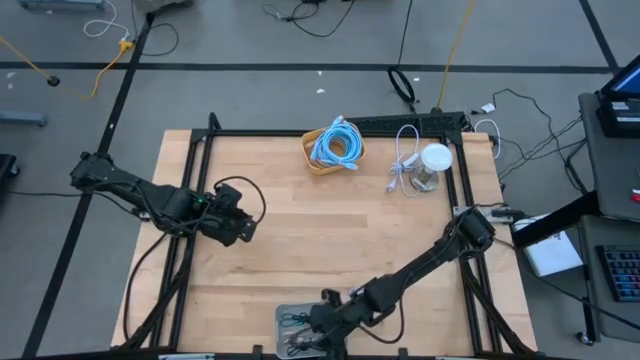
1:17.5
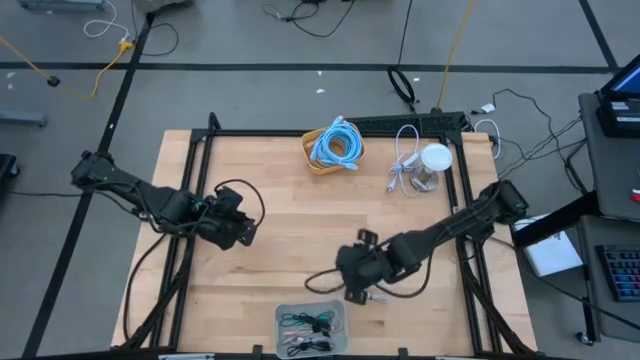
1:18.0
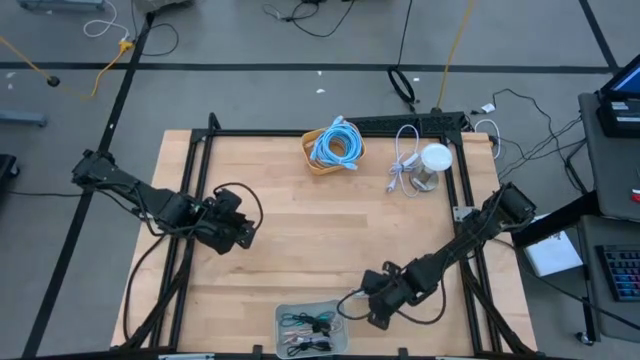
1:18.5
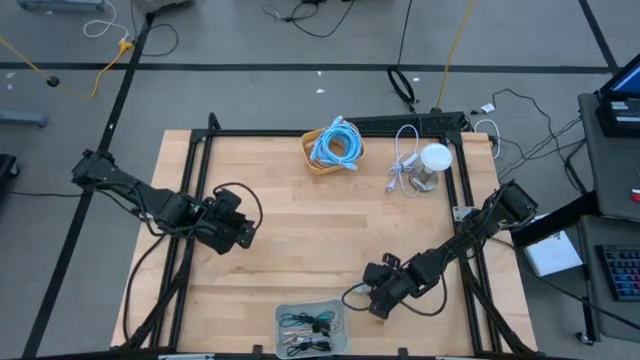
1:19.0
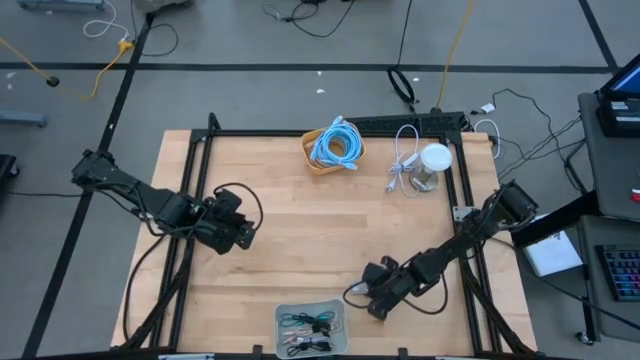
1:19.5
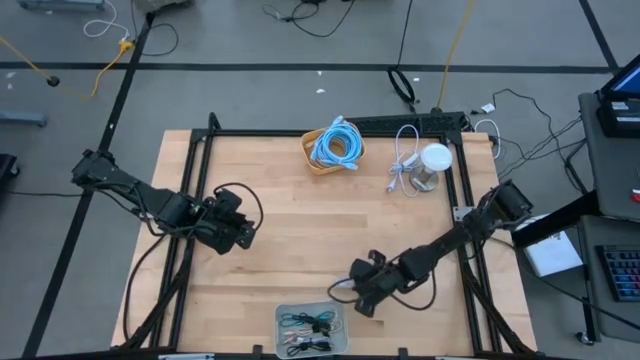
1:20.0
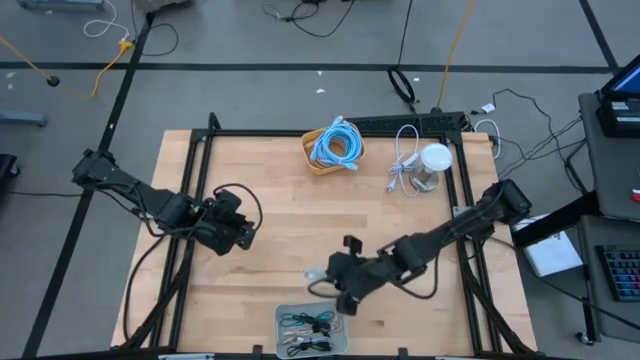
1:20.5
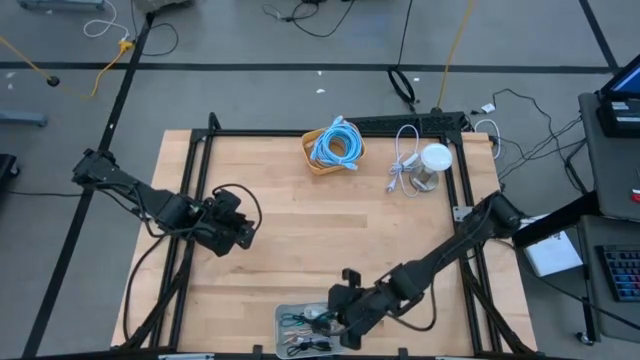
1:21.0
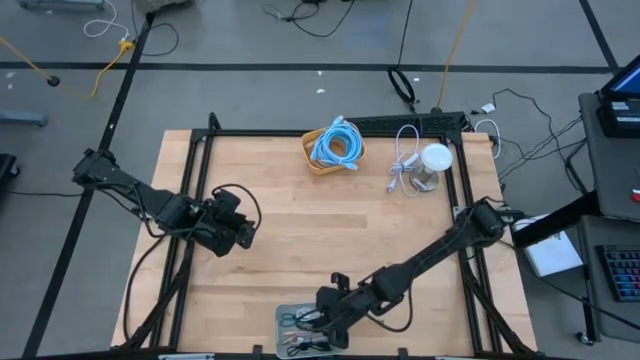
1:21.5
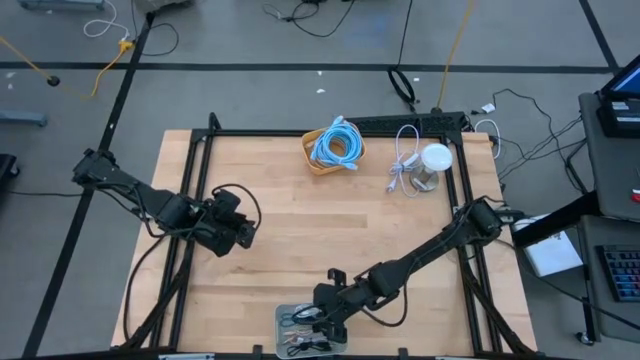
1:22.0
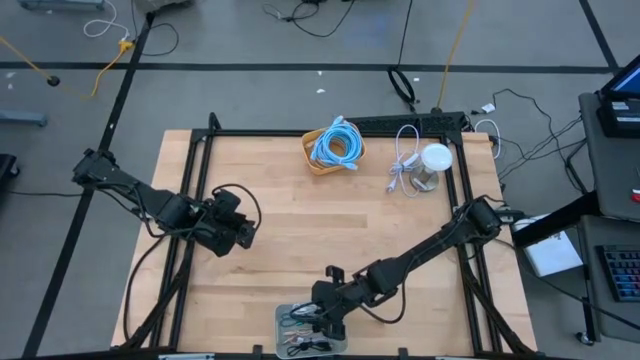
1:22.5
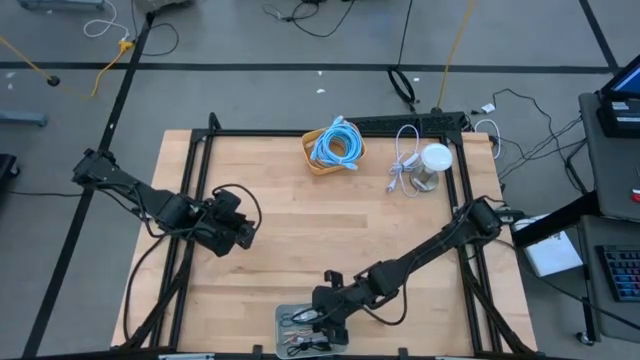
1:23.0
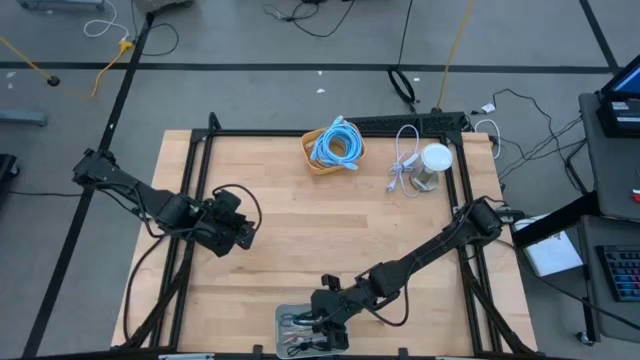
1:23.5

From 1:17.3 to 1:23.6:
Task: Pick & Place USB Port
Put the white charger cable into the gray bin

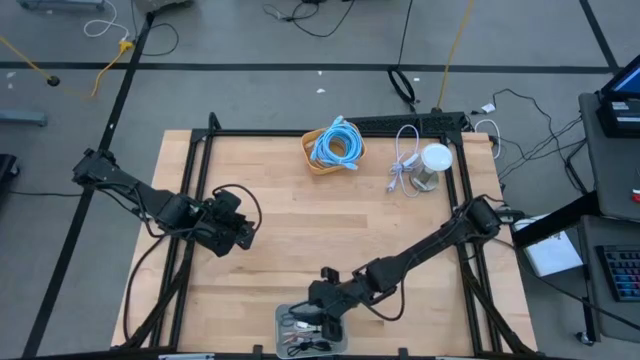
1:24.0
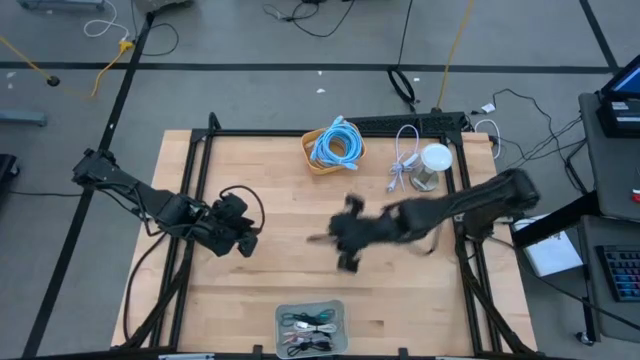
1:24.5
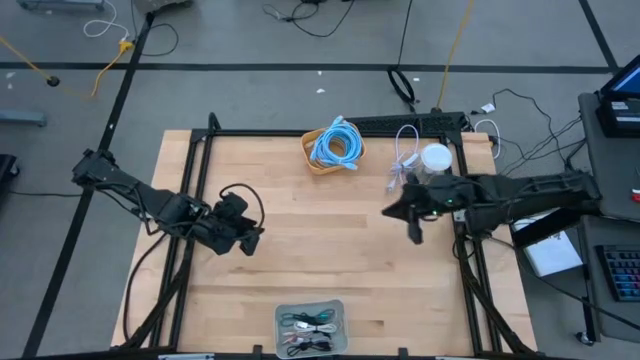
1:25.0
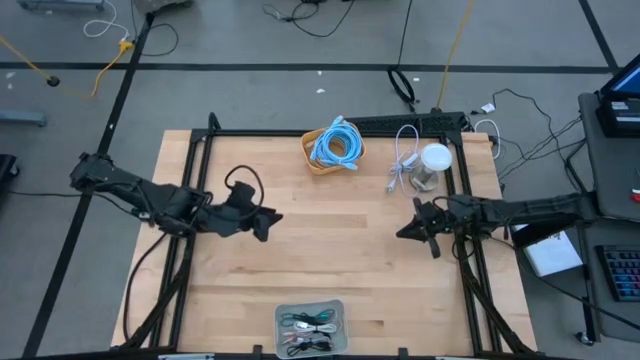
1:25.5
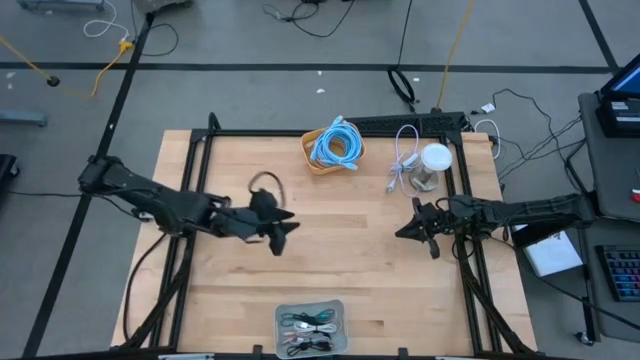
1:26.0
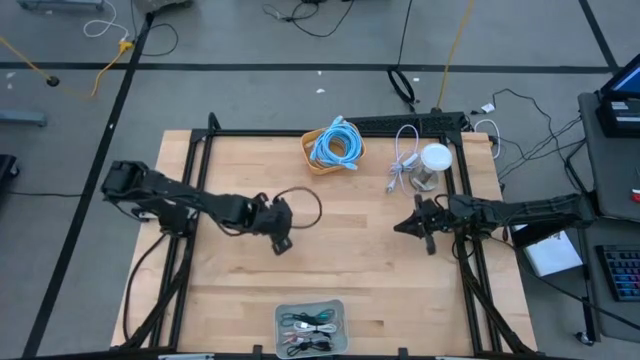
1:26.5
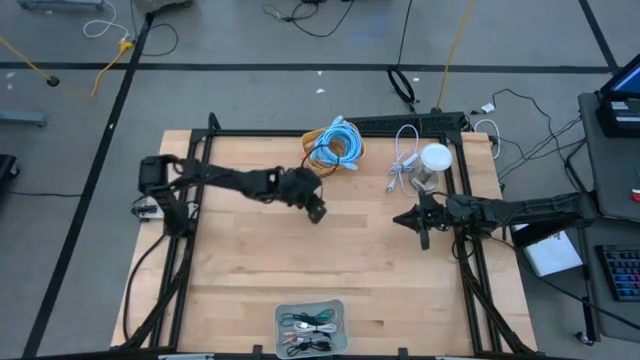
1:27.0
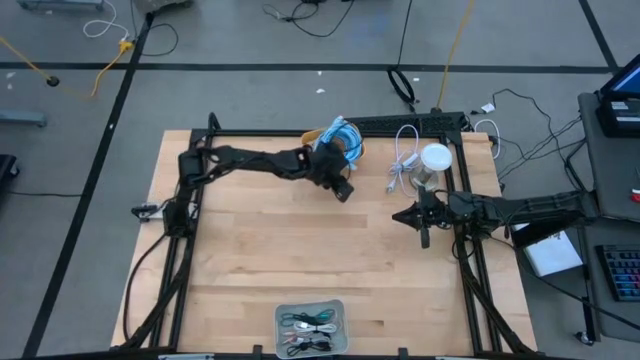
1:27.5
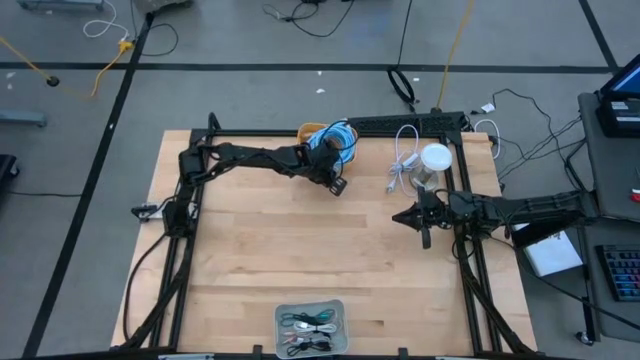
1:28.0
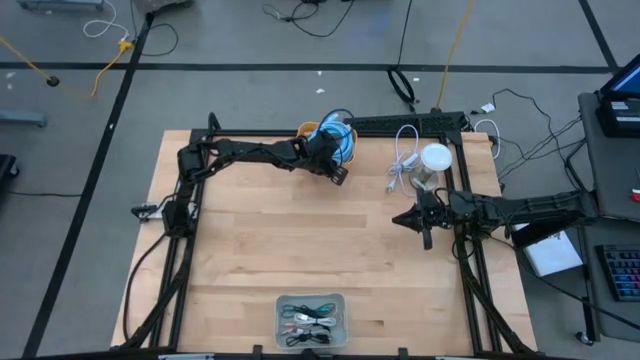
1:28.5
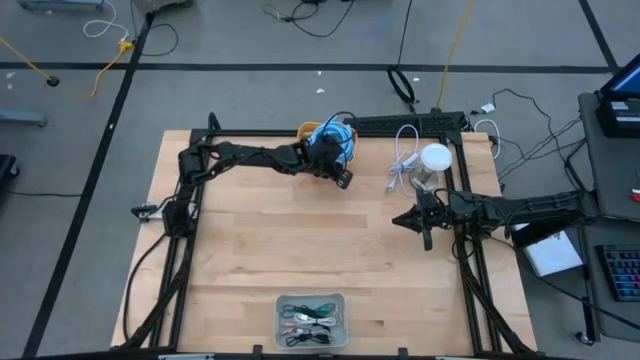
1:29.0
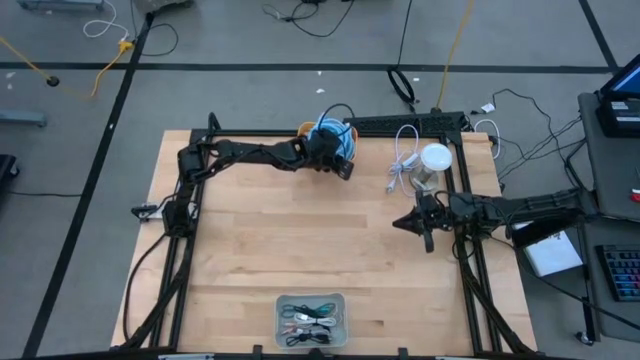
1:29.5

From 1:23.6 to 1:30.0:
Adjust the HDMI cable

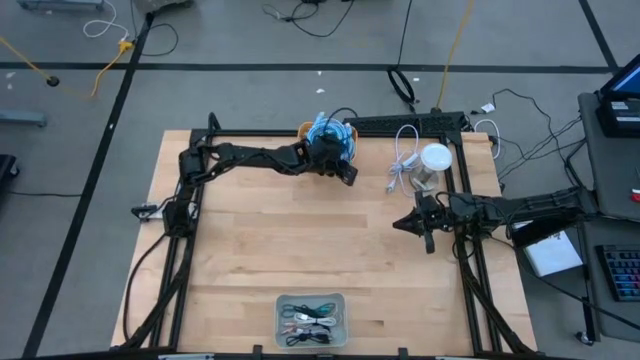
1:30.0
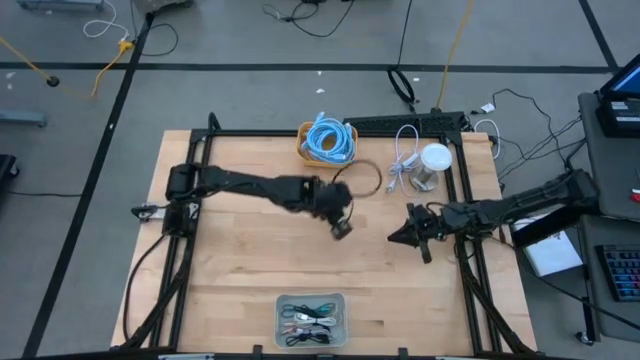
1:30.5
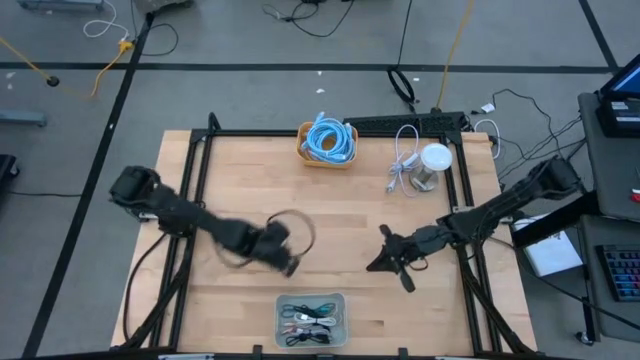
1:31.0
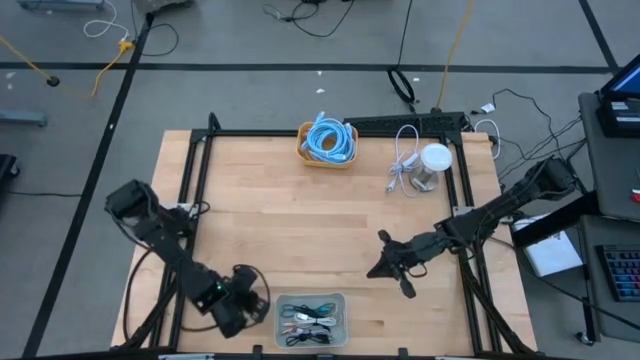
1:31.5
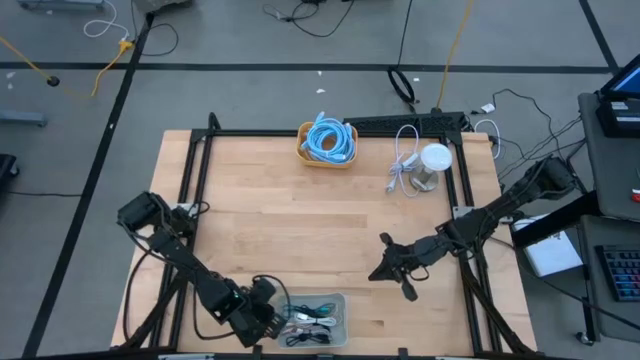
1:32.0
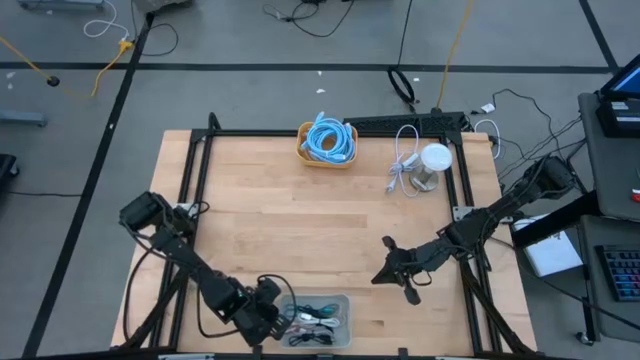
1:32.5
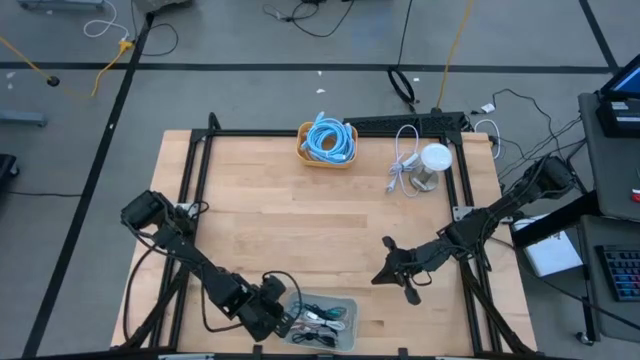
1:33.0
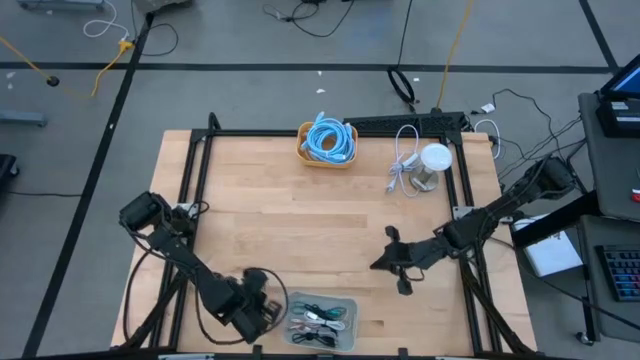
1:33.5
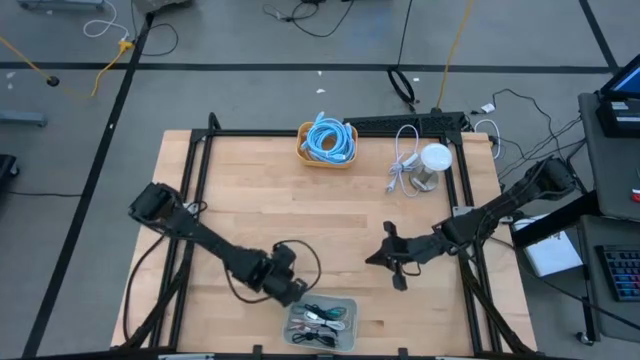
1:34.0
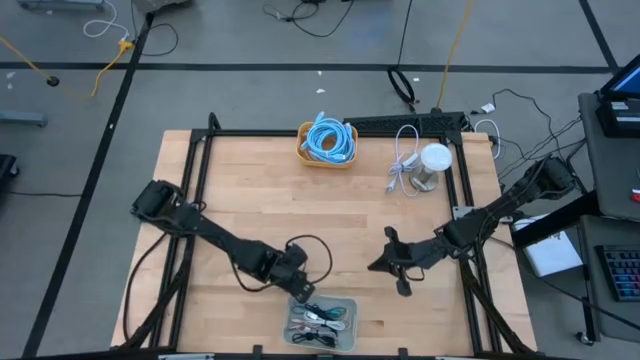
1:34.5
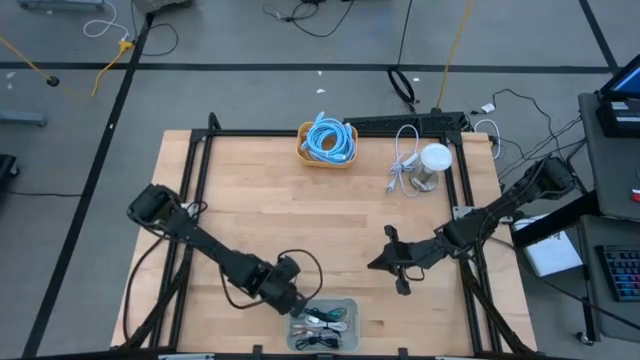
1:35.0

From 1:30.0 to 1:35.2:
Adjust the gray bin

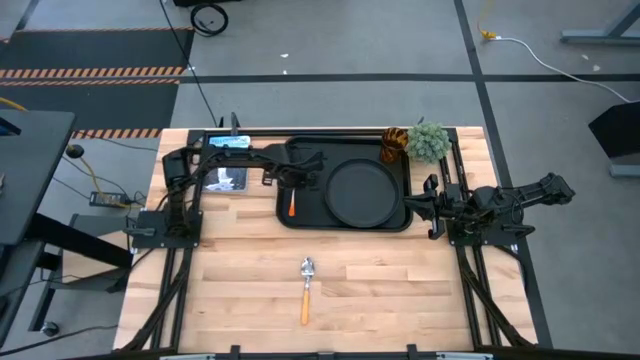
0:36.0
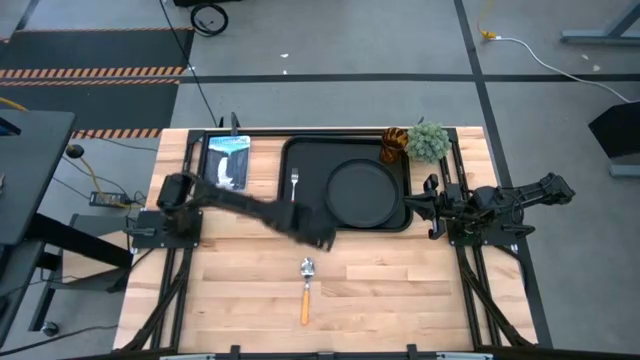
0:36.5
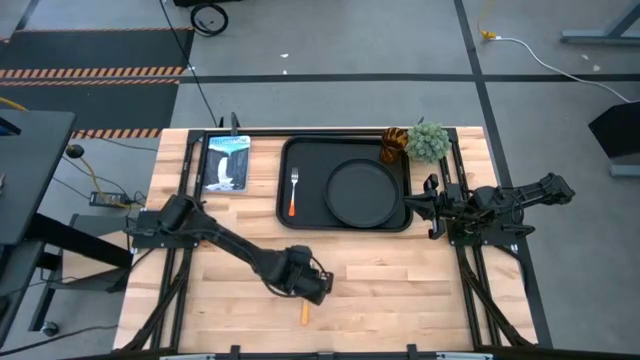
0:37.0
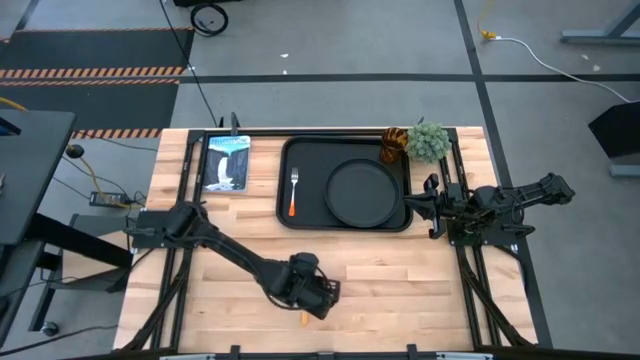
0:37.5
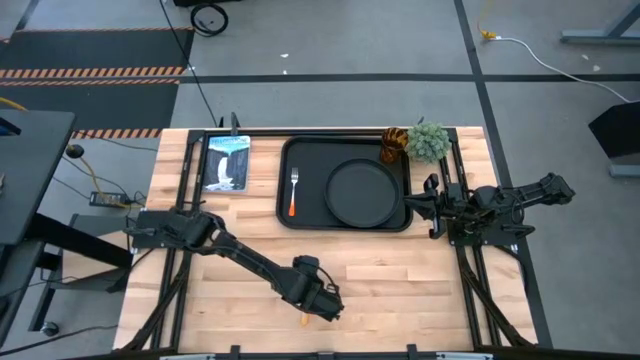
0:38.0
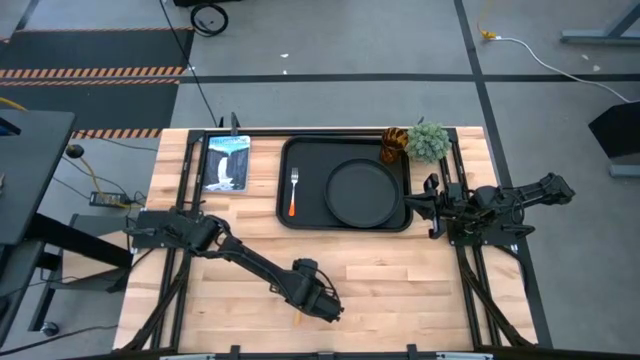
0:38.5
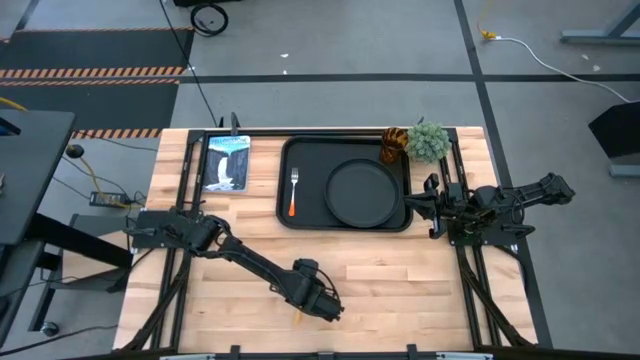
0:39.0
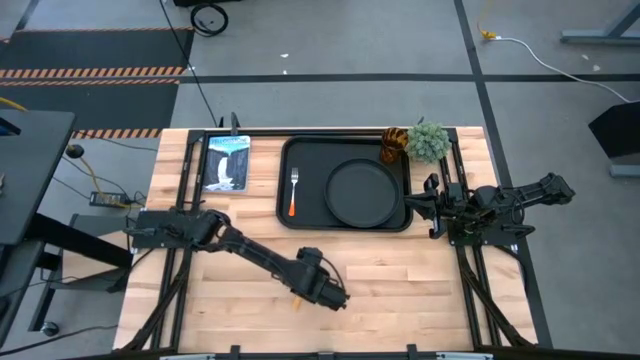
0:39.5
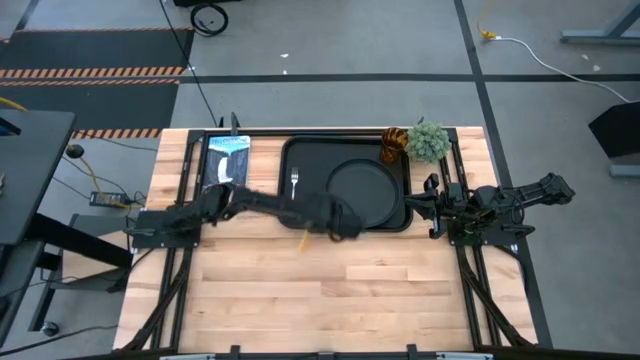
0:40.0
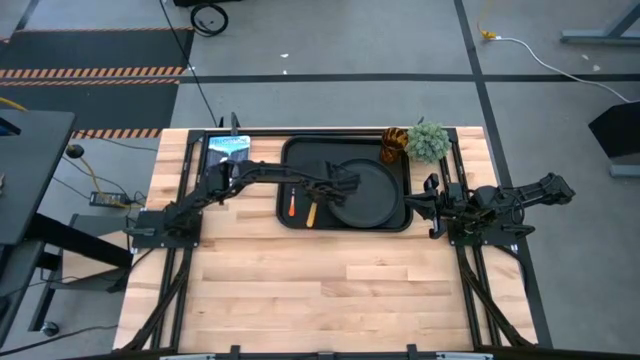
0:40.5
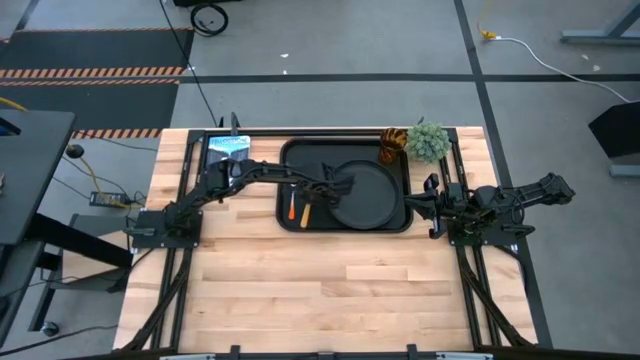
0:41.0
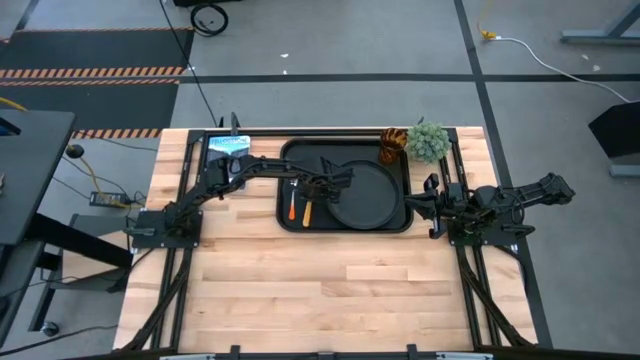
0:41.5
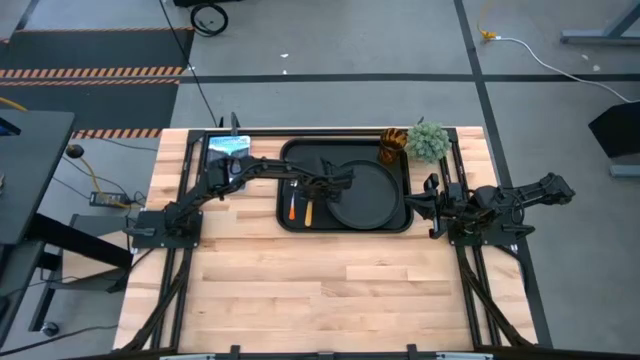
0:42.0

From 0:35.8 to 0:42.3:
Task: Pick and place plate/cup/fork/spoon on tray
Put the yellow spoon to the right of the orange fork
